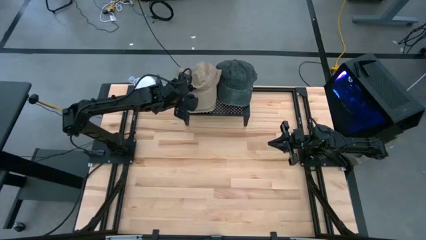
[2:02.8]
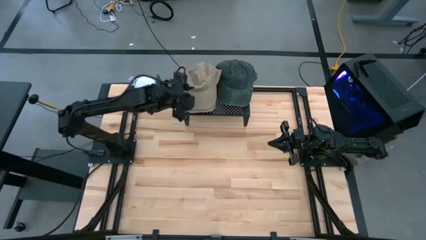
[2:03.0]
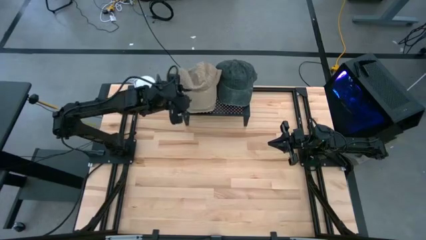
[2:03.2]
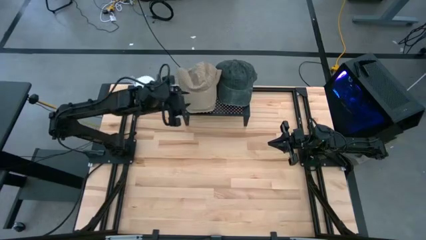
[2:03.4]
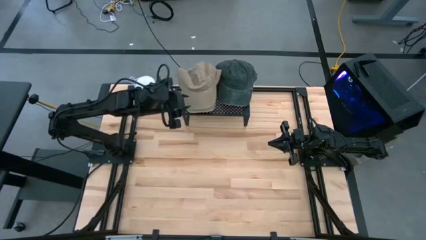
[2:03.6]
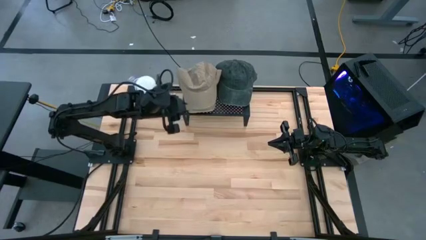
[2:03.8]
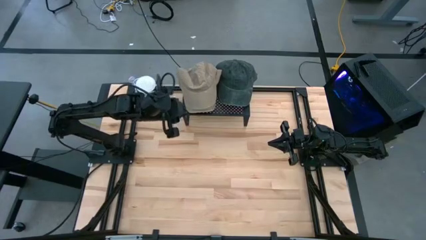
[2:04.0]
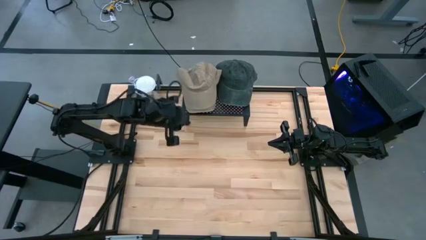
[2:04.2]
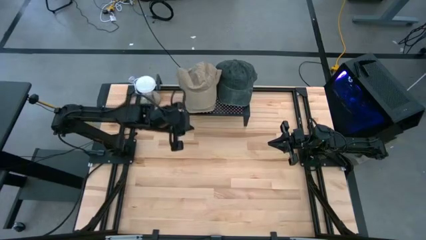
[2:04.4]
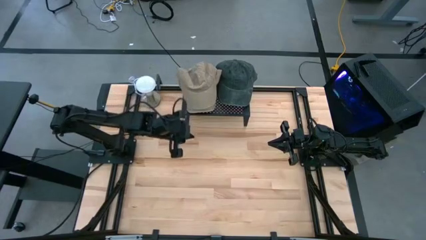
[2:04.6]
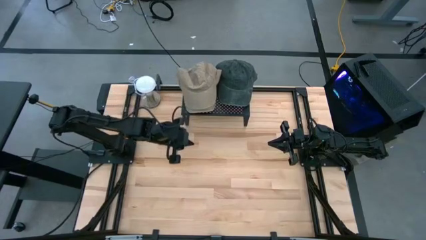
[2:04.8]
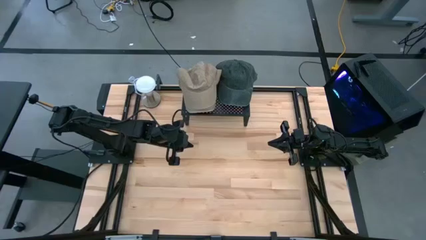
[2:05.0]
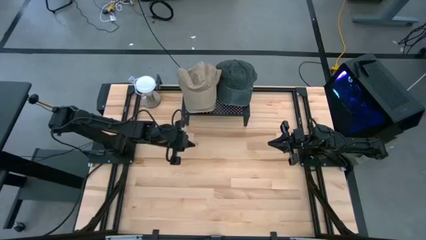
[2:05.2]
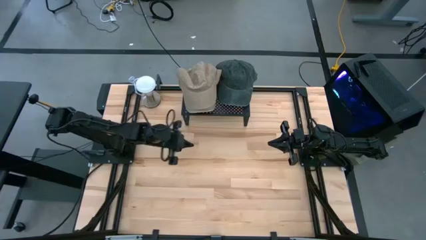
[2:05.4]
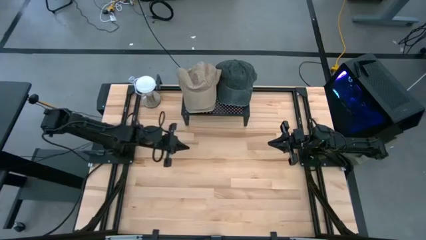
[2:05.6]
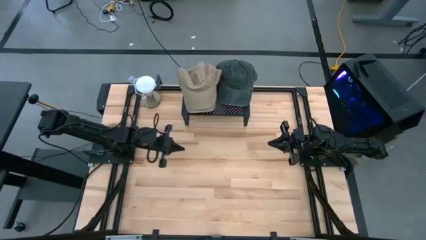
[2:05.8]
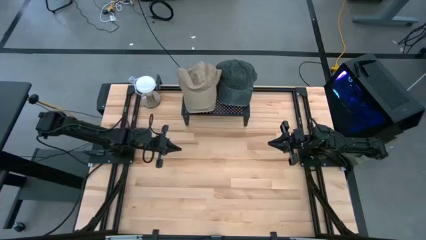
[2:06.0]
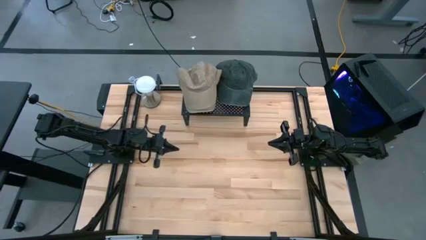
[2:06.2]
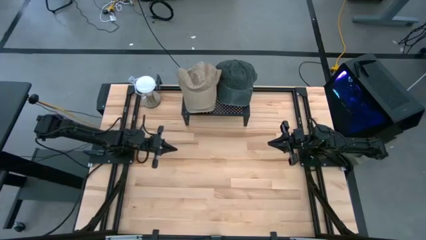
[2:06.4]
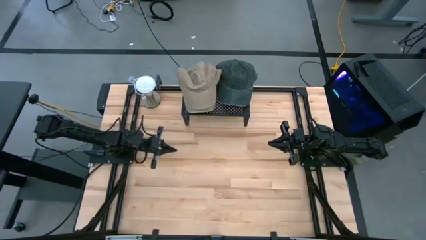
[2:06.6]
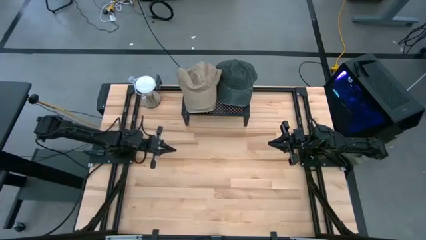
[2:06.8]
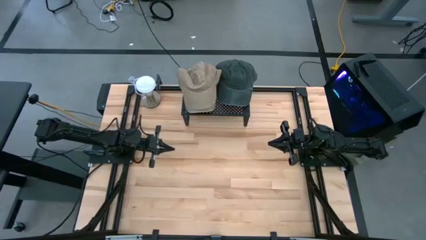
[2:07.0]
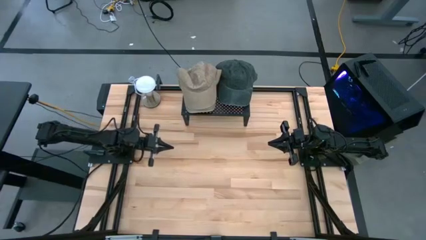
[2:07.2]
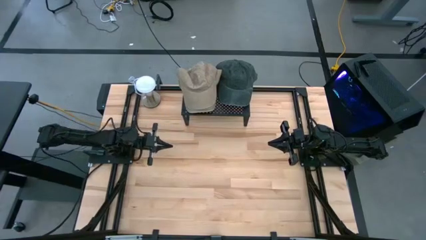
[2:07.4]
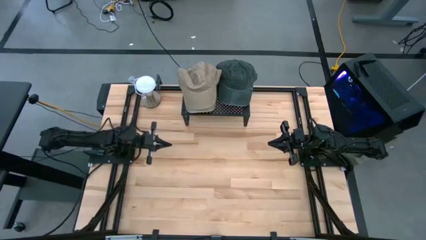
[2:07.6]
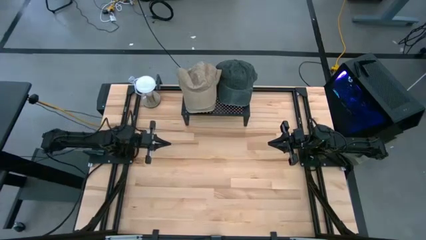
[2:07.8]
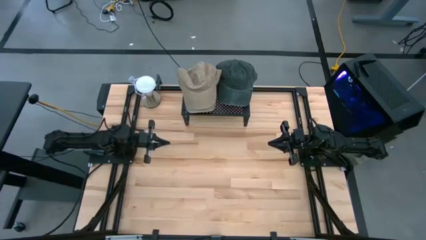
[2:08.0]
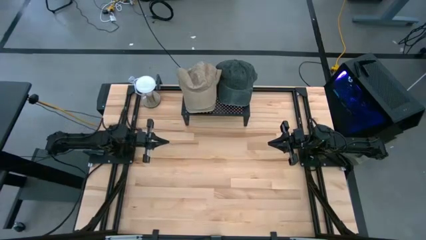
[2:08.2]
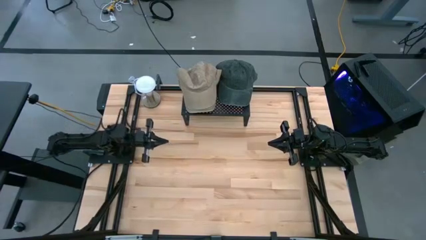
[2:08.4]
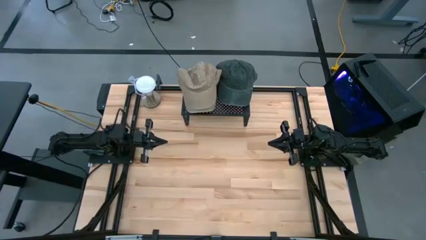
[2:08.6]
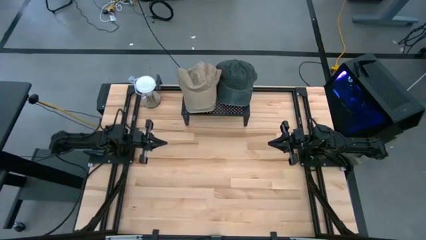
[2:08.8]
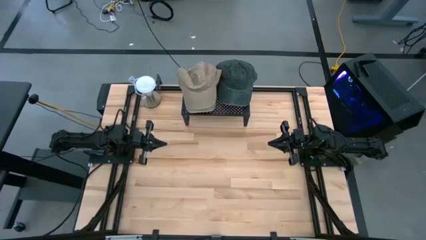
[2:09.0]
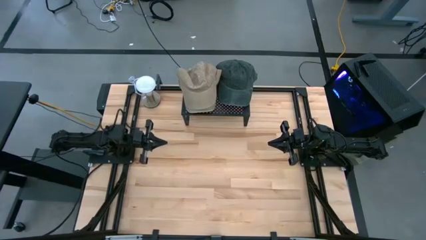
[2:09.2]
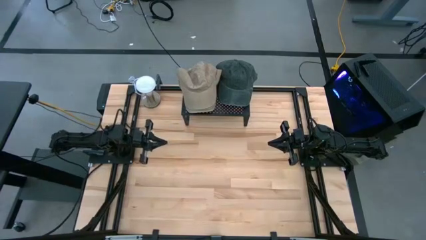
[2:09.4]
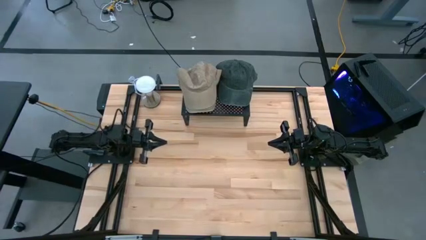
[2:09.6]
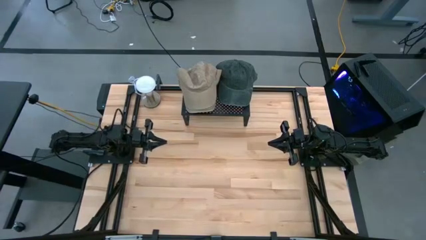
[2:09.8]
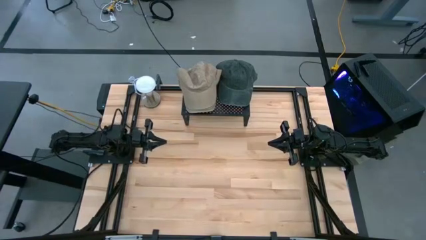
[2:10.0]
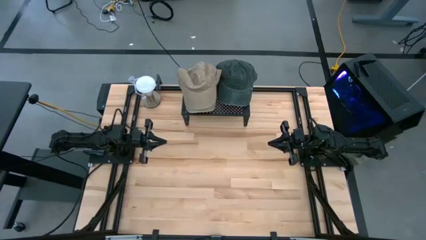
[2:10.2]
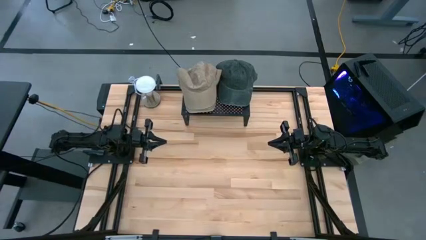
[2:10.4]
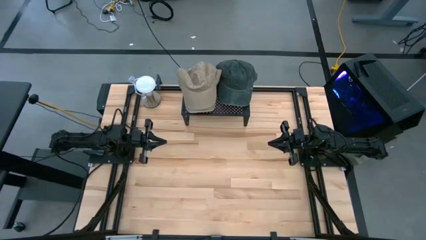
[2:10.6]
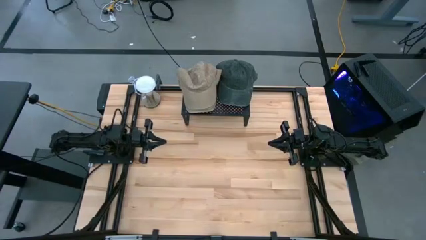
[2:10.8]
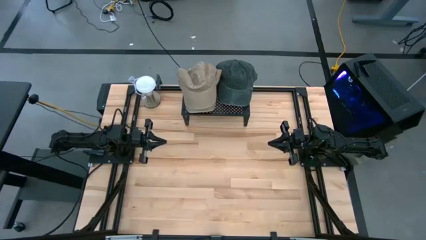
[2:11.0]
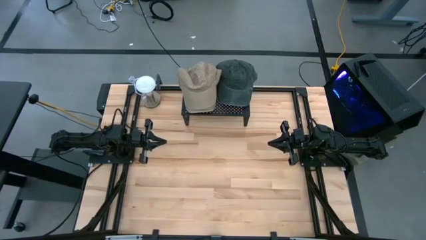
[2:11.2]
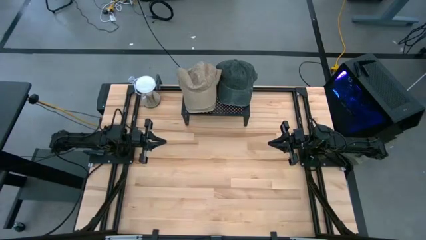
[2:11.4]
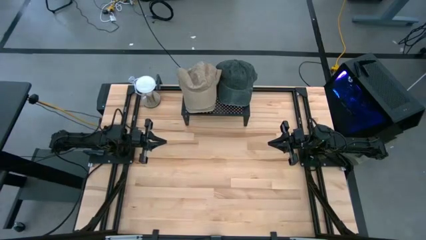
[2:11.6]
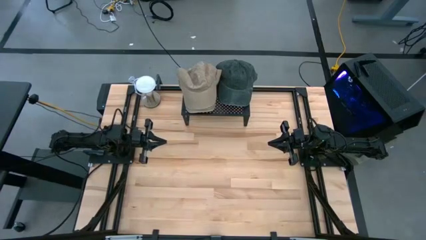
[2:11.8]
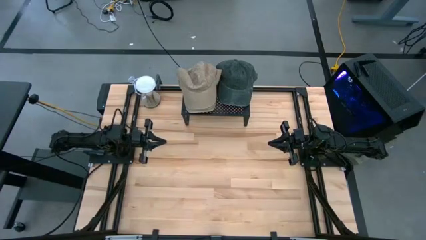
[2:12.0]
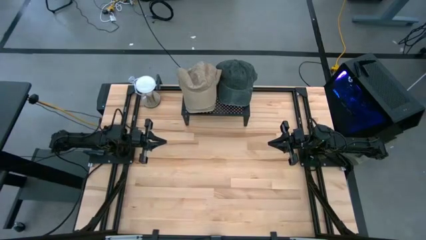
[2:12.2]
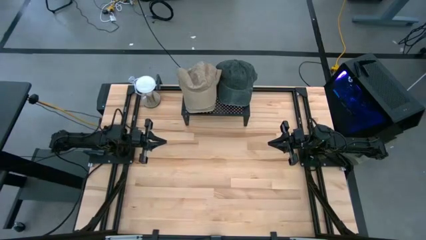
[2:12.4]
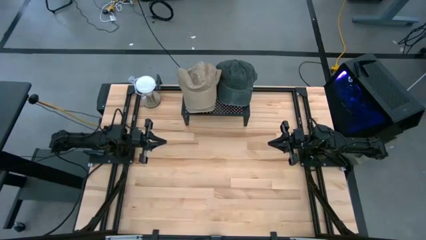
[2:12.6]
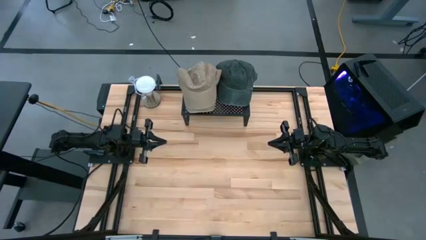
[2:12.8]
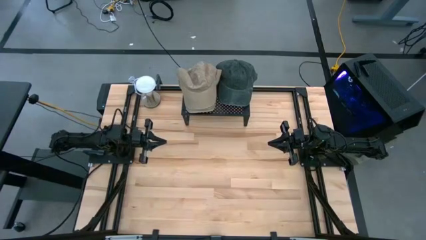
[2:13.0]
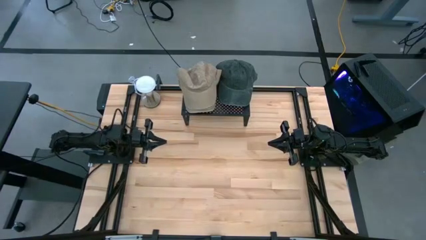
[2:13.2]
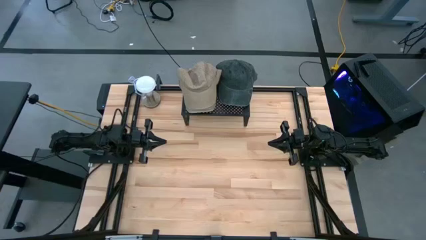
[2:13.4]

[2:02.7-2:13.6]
Task: Pick & Place hat
Return to Home Position

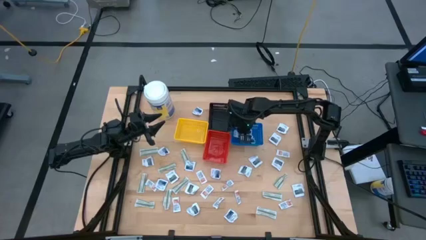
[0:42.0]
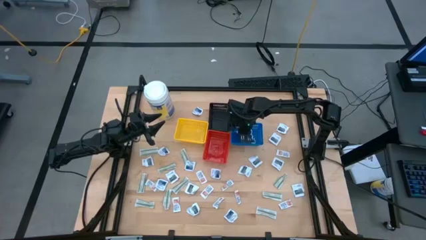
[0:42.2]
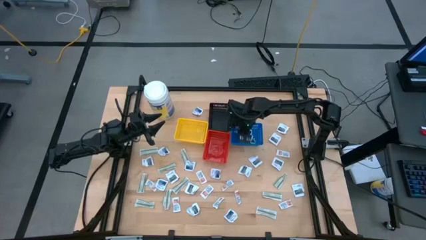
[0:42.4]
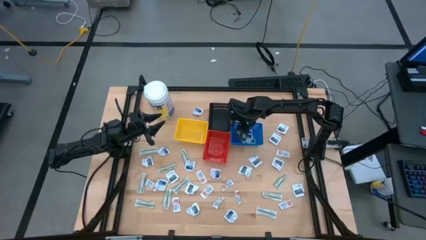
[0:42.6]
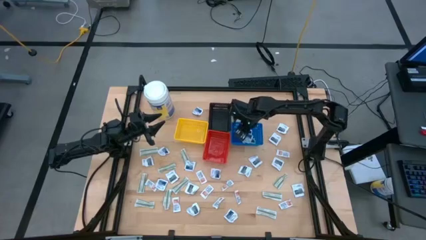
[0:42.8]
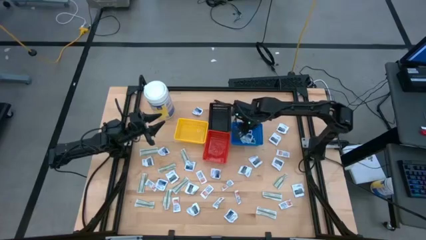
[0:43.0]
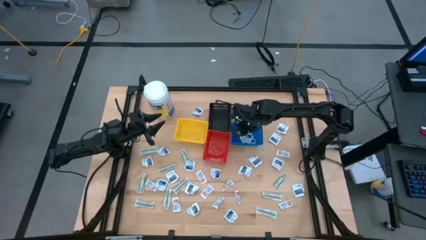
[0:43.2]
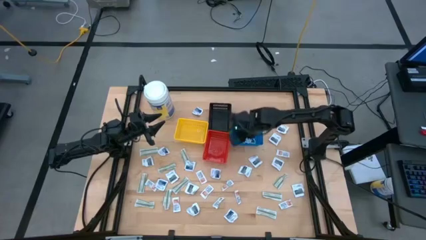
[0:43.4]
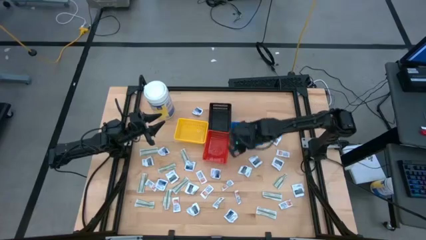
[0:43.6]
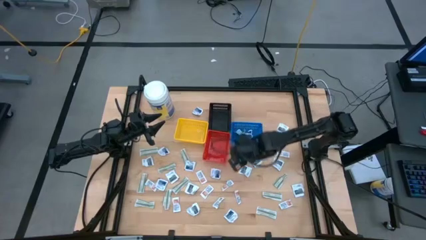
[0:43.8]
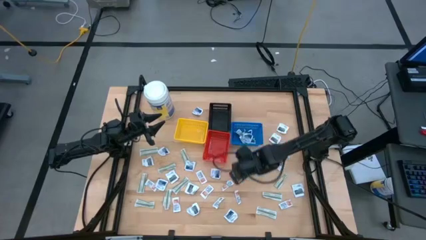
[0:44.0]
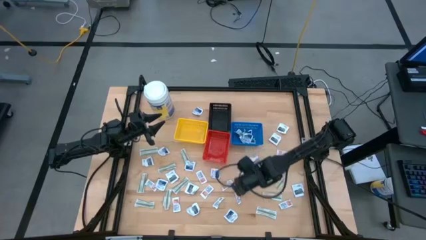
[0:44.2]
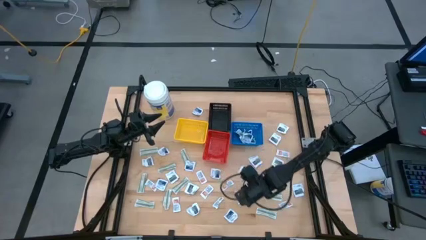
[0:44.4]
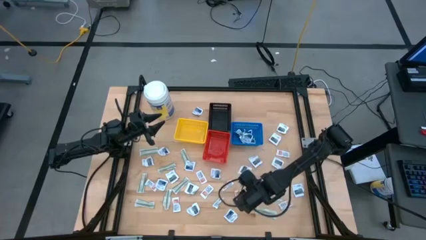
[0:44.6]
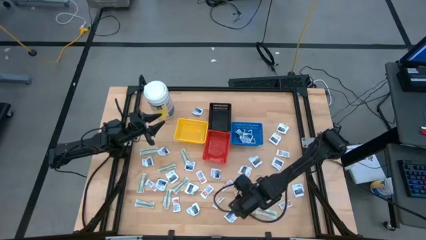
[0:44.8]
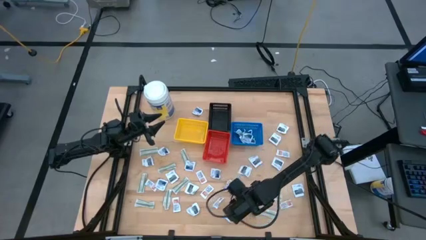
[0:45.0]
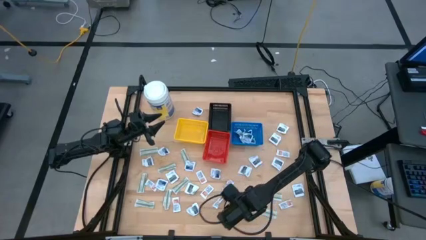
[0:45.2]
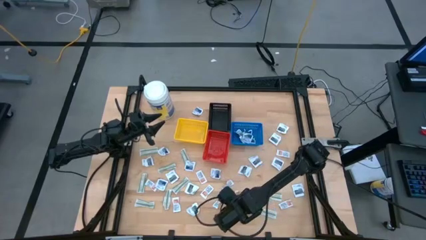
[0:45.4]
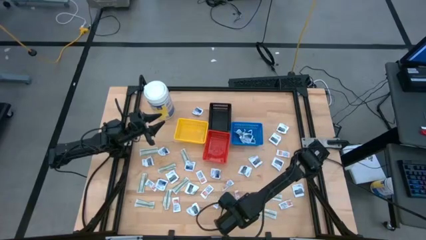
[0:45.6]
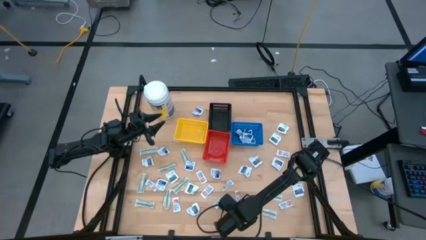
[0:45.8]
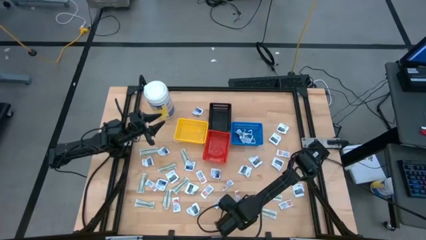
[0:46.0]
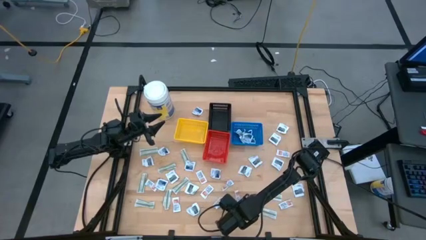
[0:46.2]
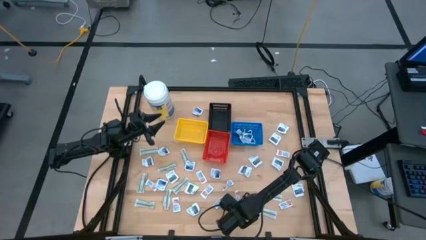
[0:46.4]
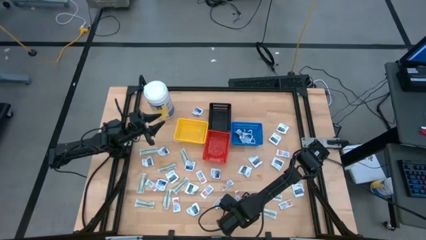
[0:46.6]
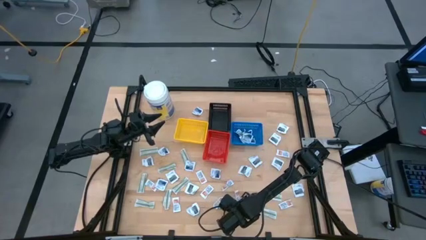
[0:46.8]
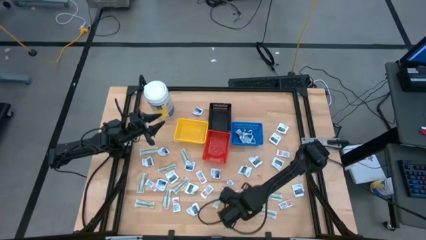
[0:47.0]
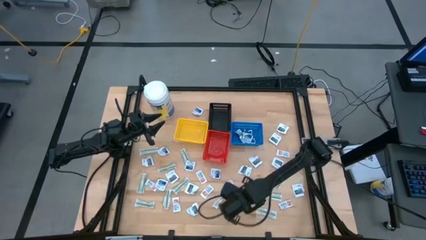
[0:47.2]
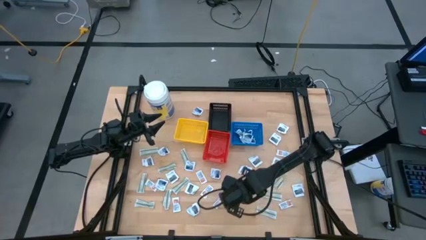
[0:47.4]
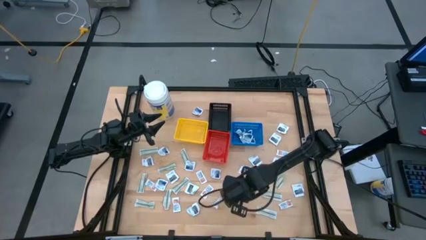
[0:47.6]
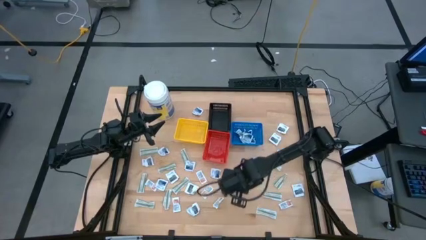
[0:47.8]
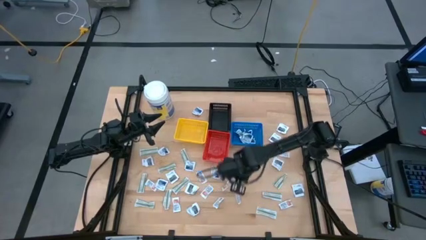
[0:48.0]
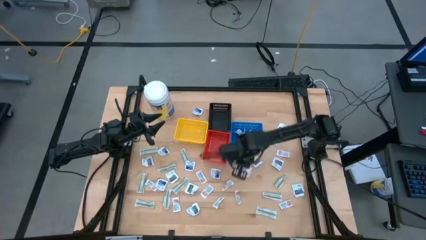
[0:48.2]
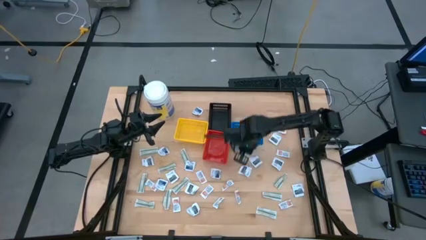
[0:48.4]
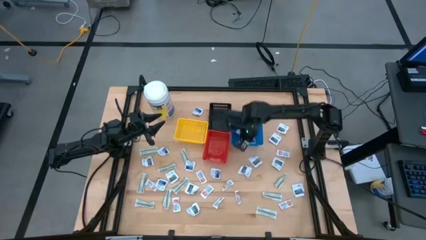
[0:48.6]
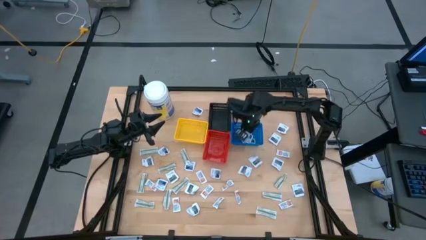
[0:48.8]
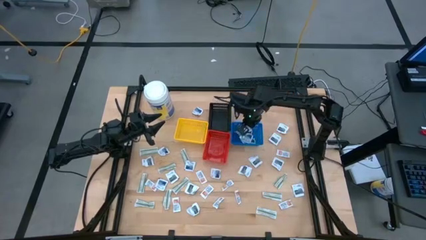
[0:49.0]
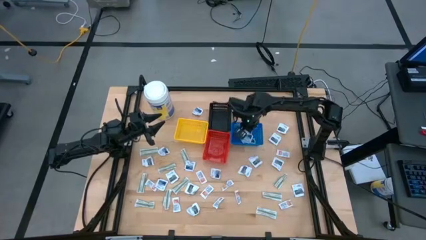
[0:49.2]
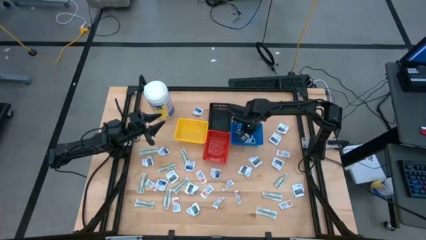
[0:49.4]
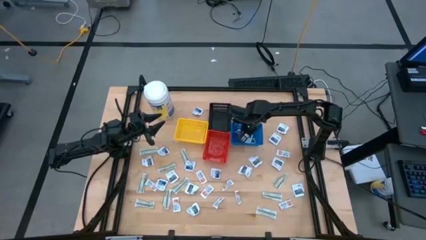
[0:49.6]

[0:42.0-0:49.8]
Task: Pick & Place First Aid Supplies
Put the alcohol pad into the blue bin
